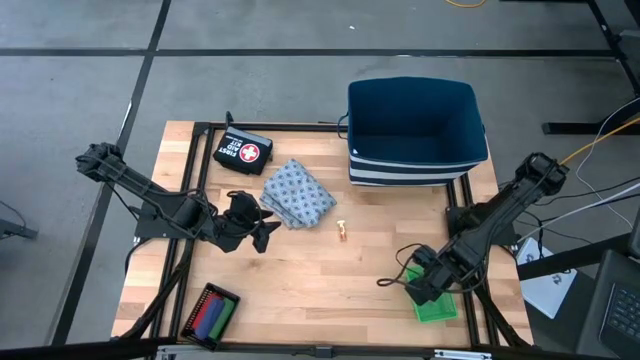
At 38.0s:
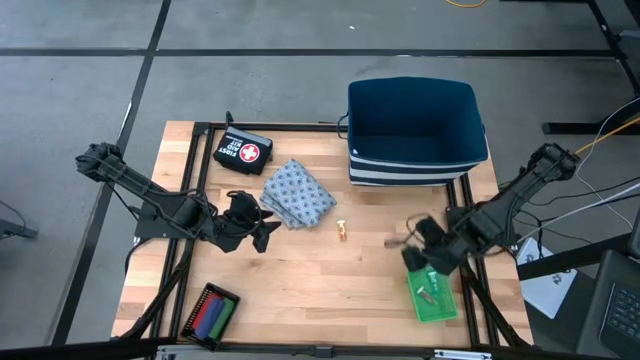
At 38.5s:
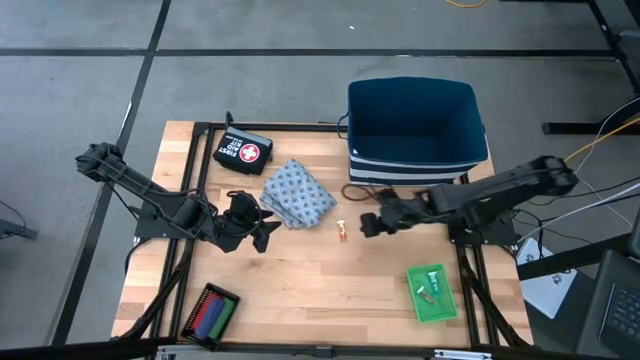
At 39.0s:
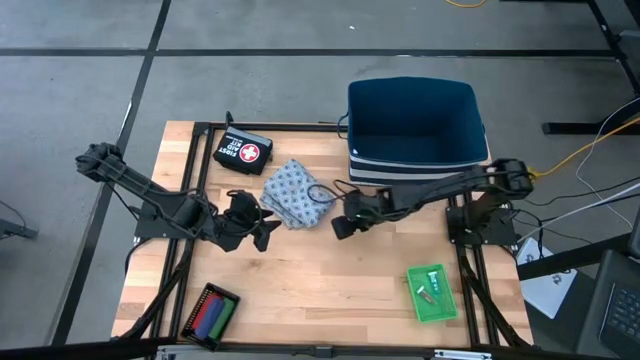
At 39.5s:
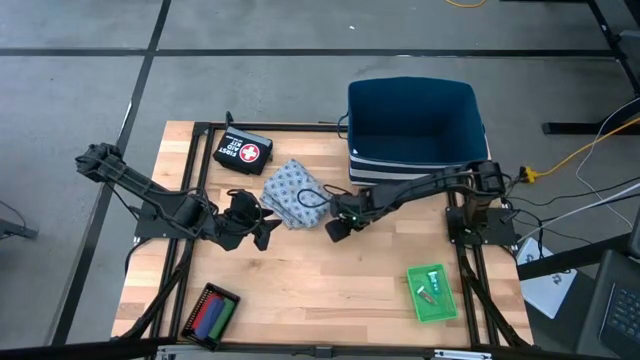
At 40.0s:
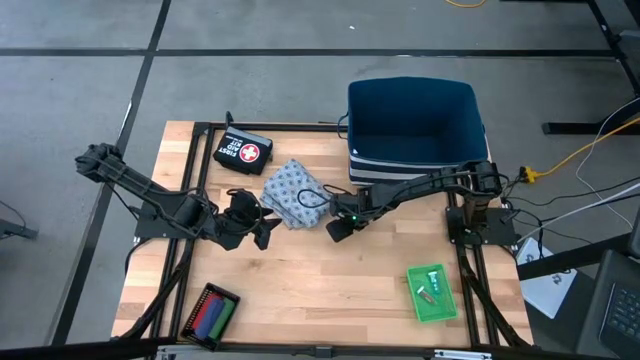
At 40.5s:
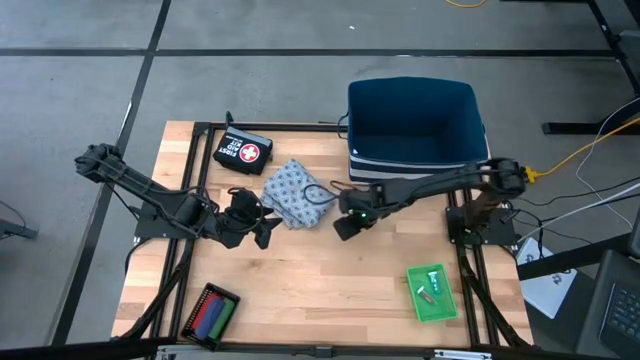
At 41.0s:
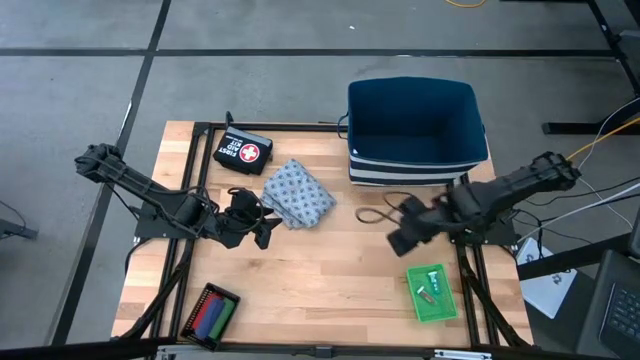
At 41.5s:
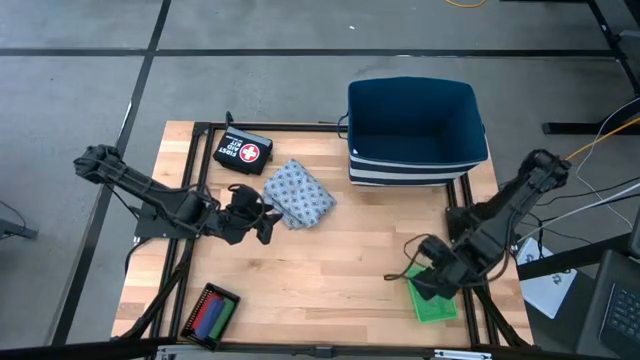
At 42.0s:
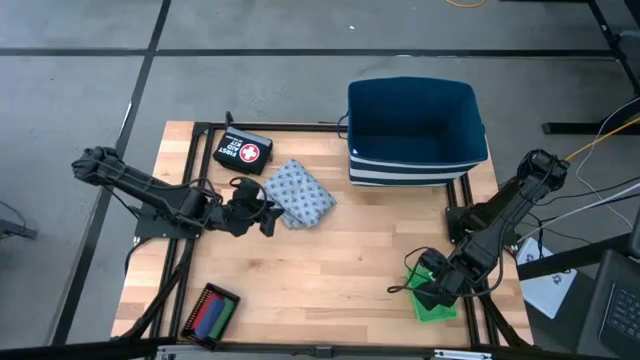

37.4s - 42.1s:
Task: Pick & place medical supplies in basket/bin
Put the yellow pill bottle into the green bin

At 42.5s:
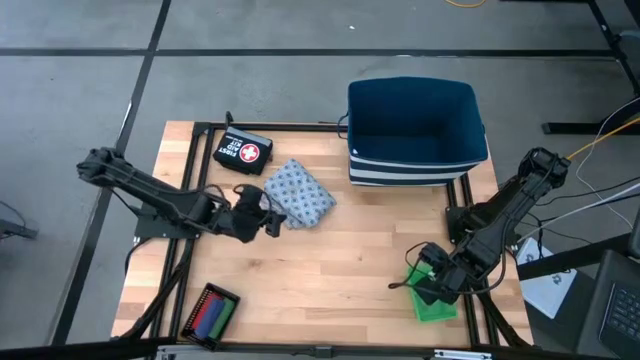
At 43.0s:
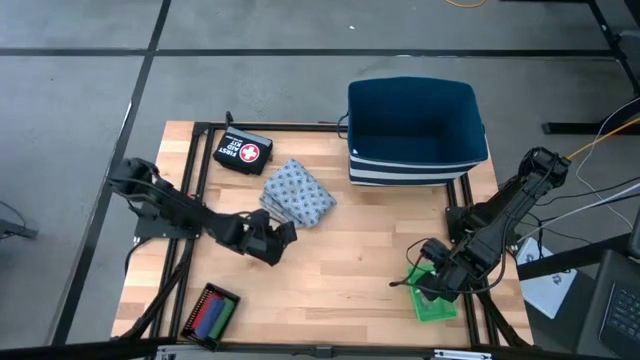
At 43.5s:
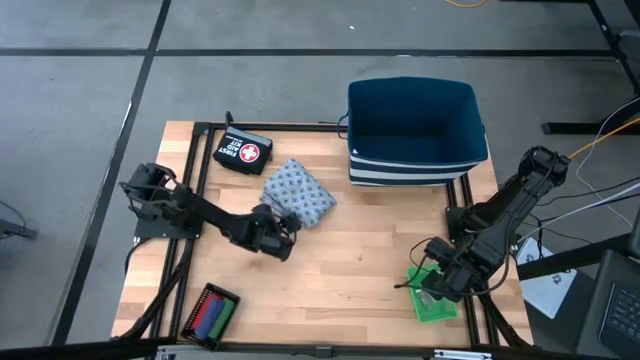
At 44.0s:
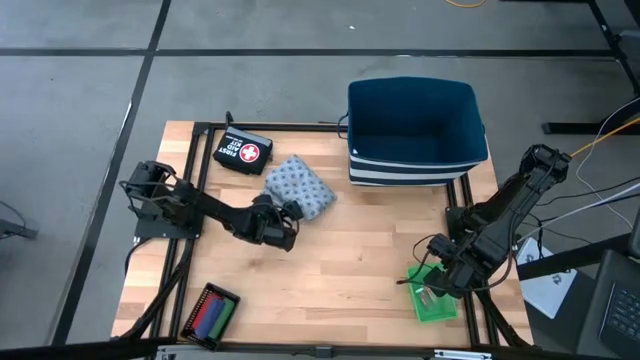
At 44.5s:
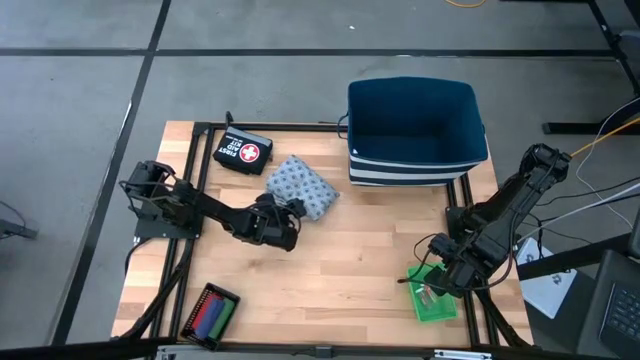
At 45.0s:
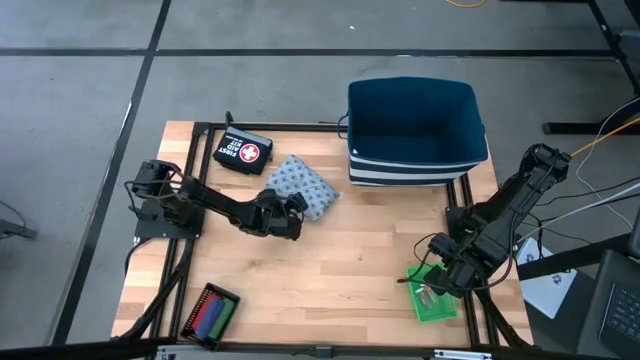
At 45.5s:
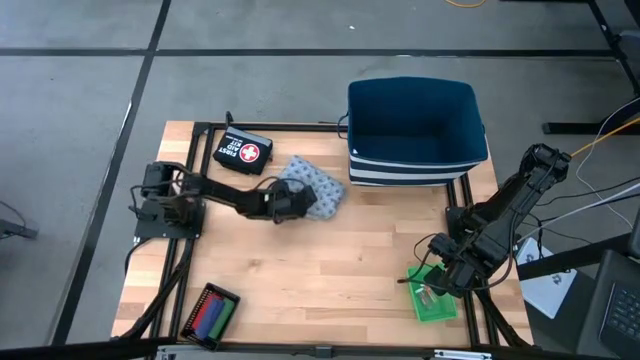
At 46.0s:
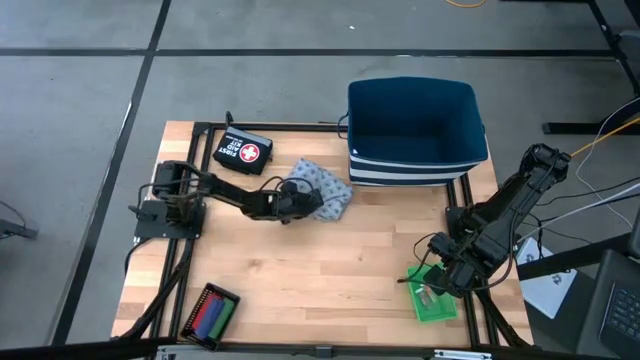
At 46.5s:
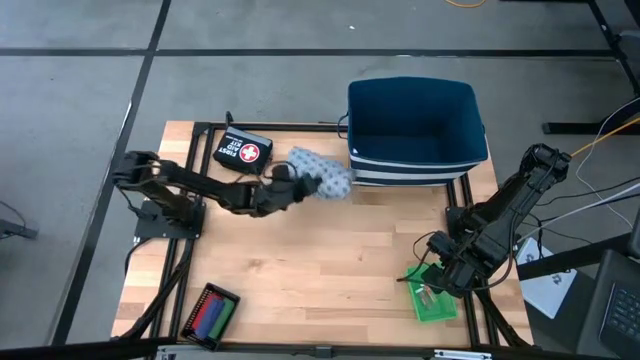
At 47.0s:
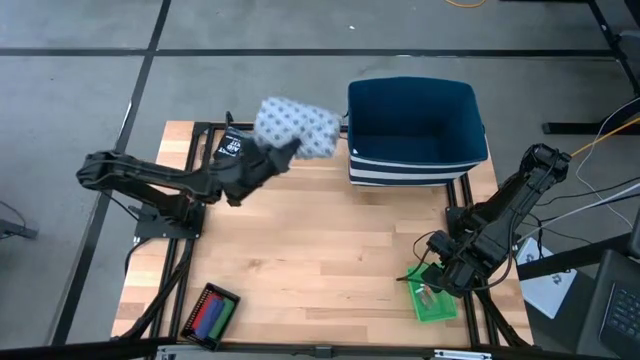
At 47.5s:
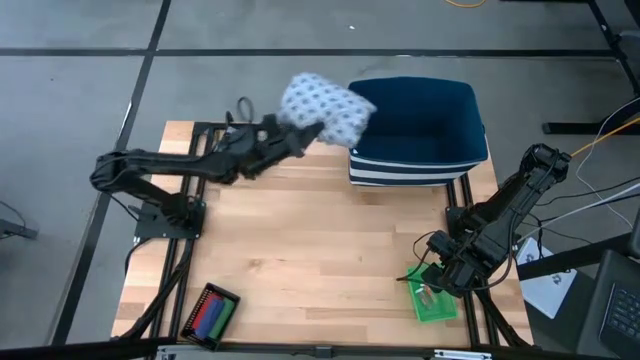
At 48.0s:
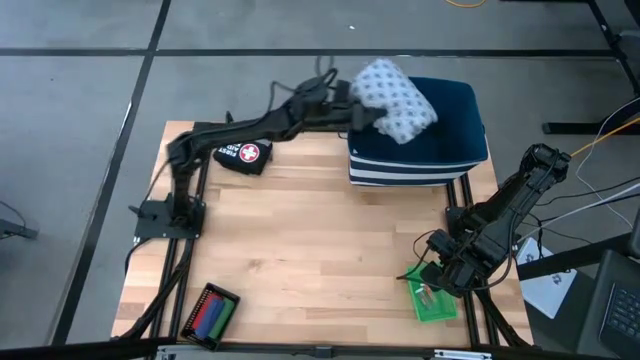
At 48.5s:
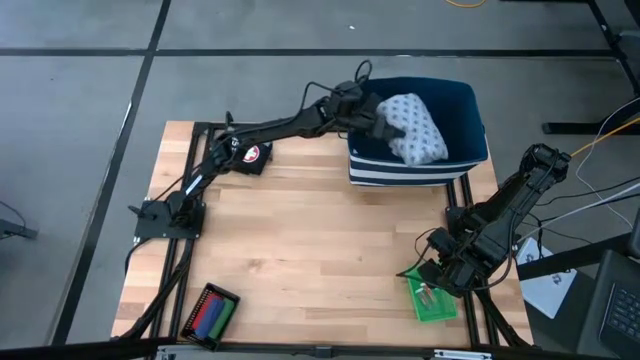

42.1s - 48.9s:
Put the patient gown into the blue bin

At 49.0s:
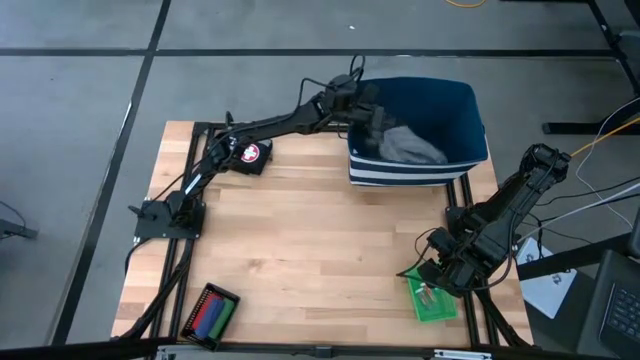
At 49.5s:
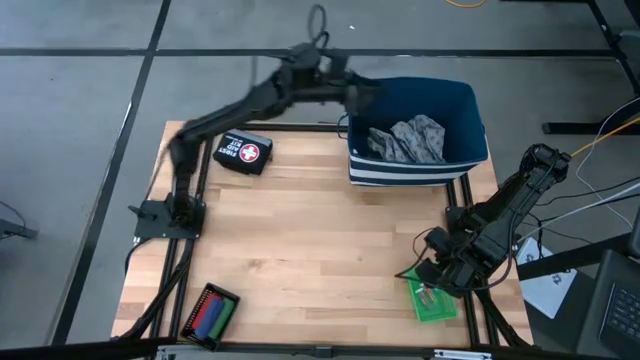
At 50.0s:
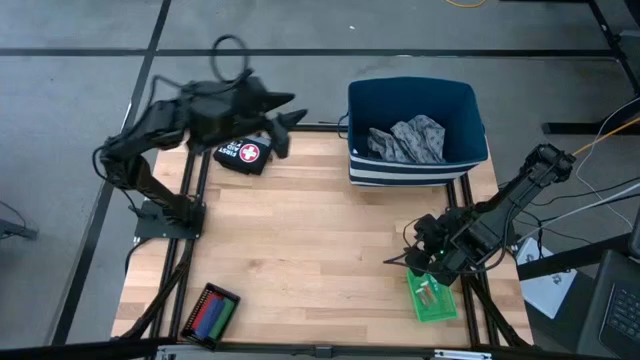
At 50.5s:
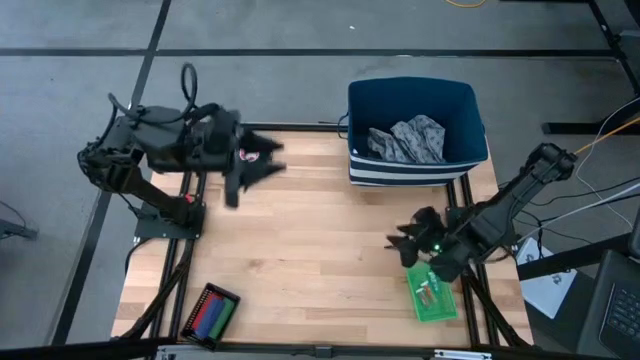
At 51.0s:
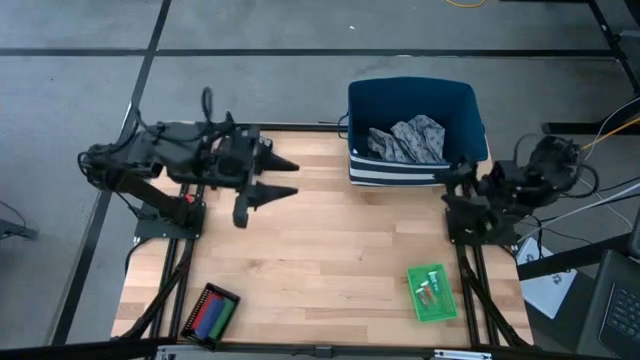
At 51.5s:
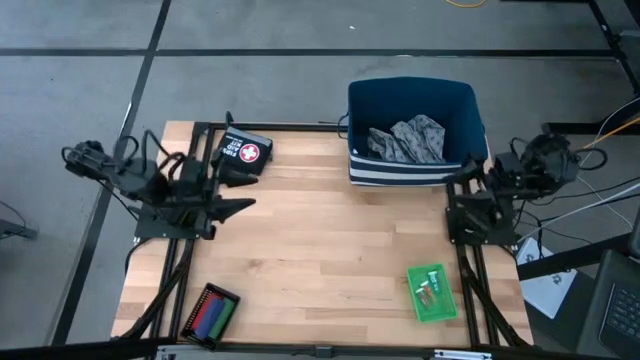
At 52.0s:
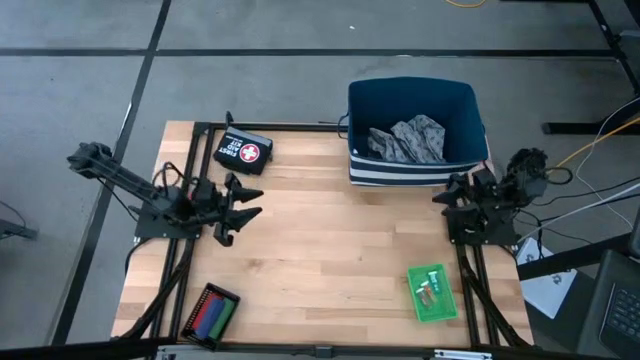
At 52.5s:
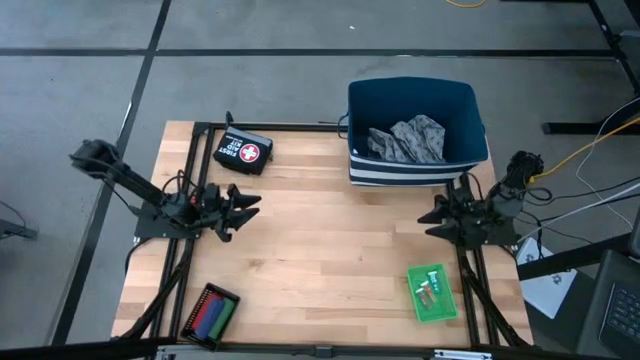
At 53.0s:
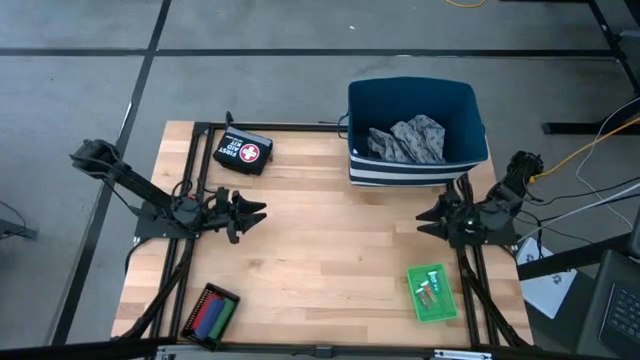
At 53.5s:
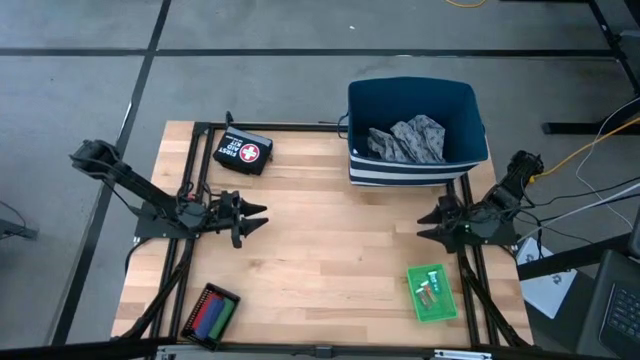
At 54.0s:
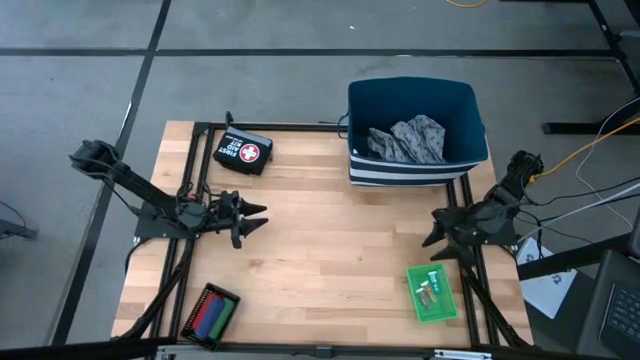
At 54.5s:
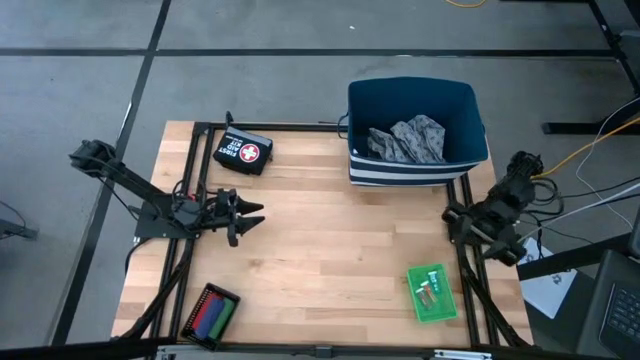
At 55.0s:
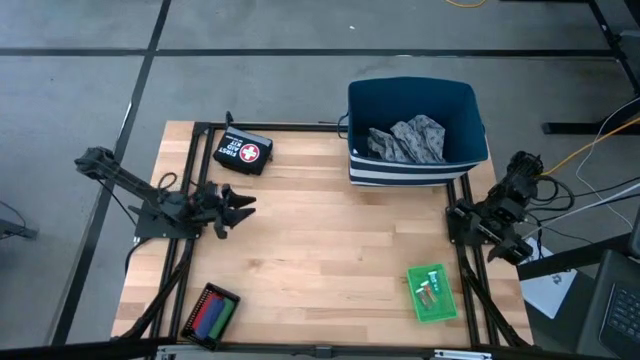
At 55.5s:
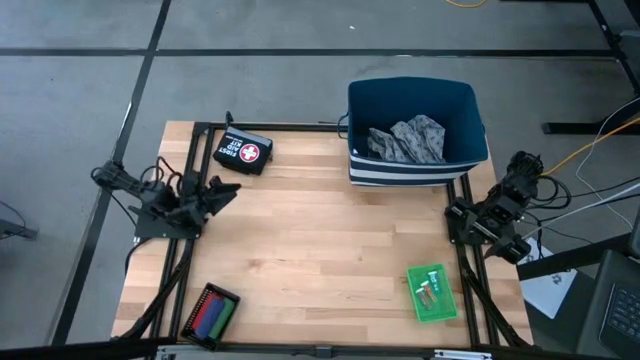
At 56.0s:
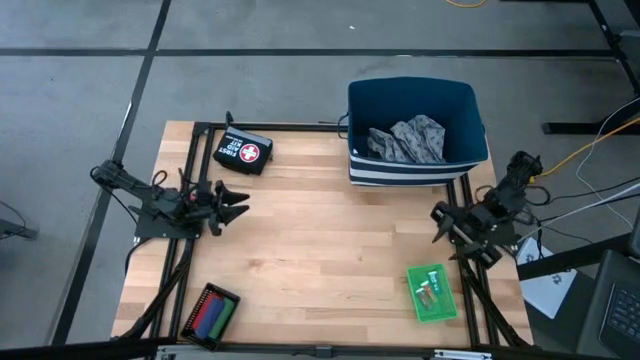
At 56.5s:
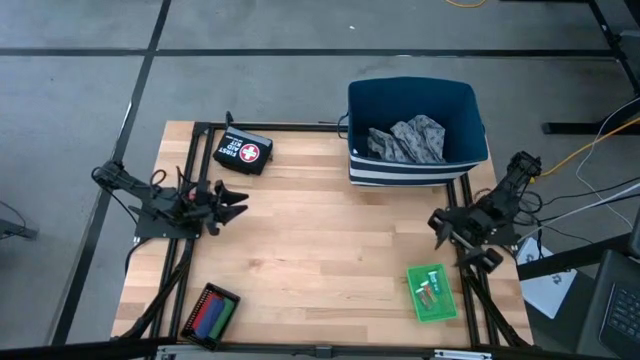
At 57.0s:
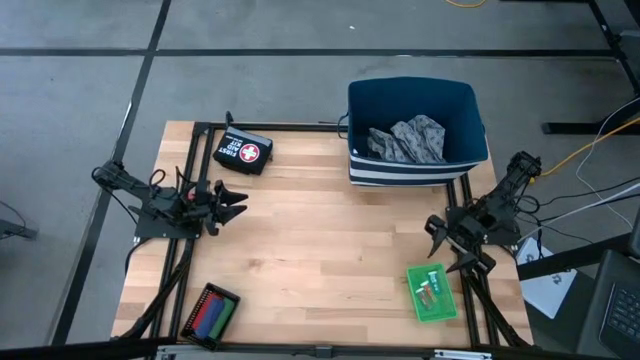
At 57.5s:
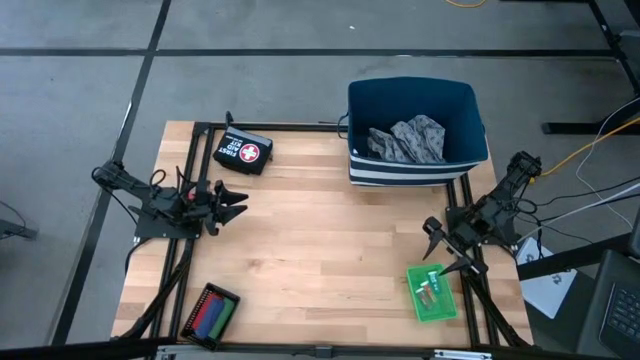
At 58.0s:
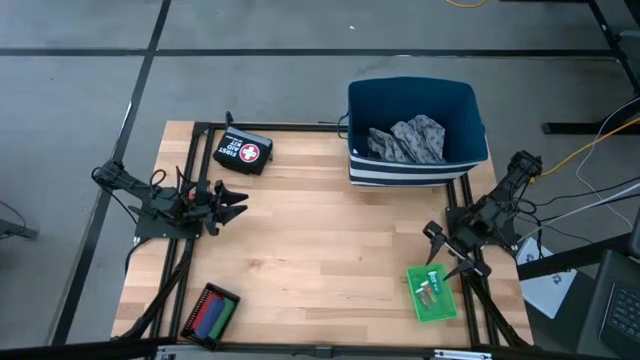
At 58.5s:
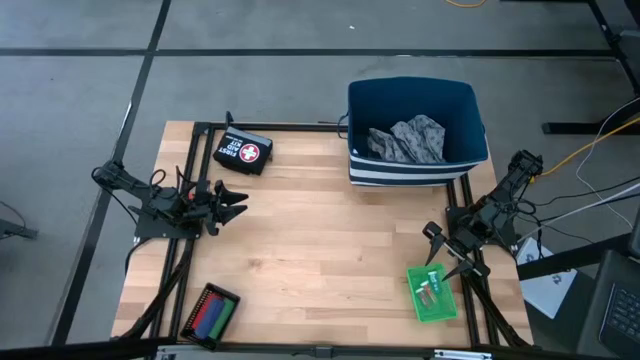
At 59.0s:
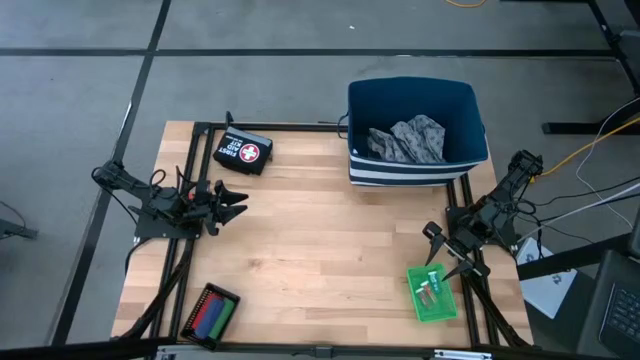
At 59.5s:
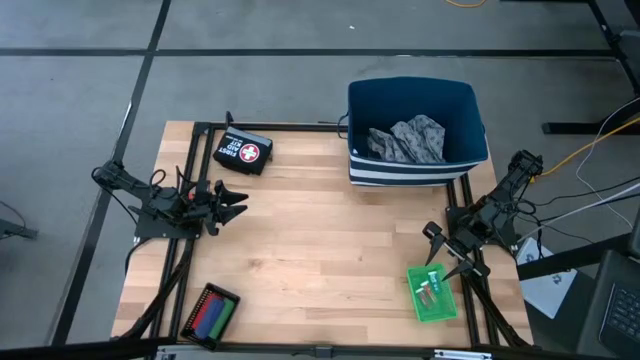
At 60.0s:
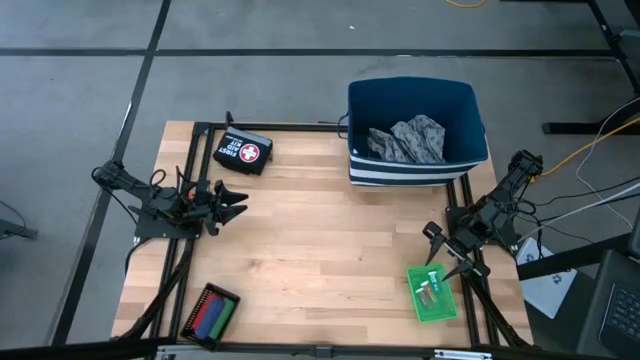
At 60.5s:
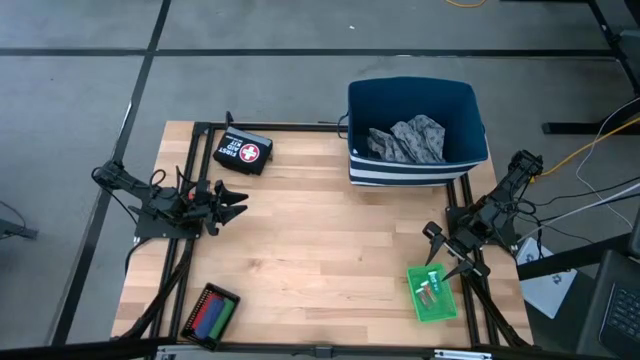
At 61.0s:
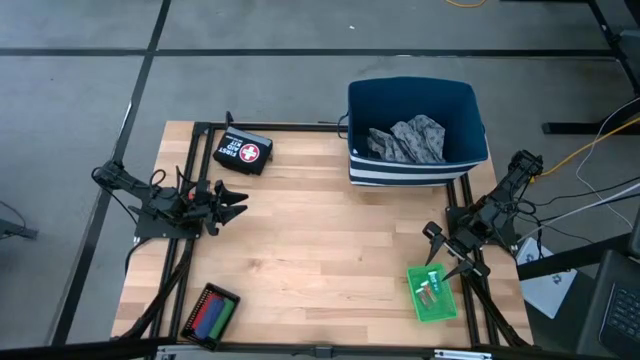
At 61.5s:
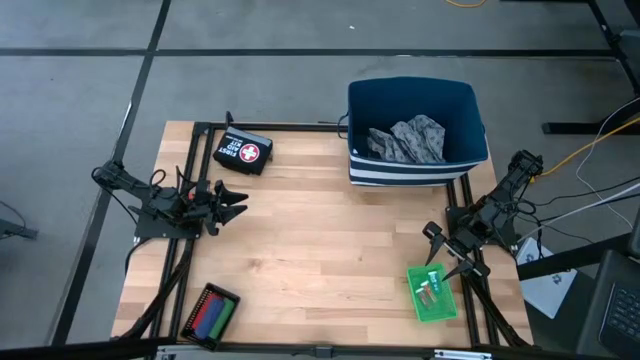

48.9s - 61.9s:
Return to Home Position
